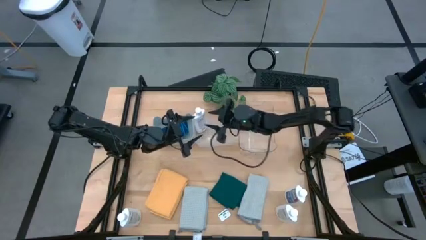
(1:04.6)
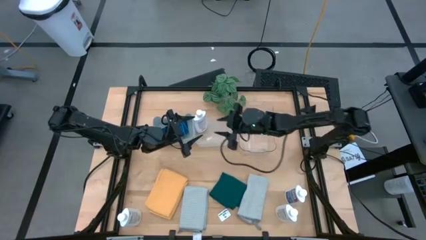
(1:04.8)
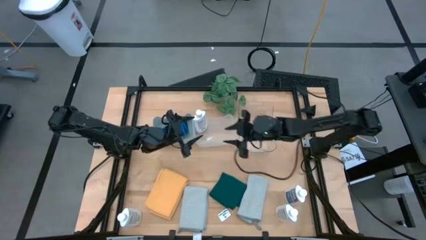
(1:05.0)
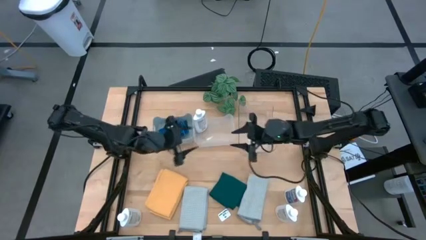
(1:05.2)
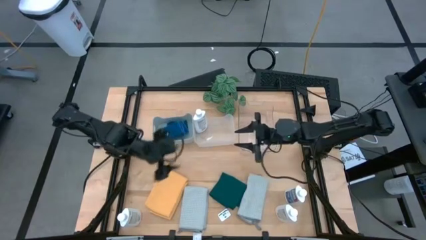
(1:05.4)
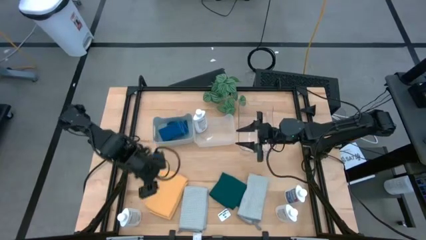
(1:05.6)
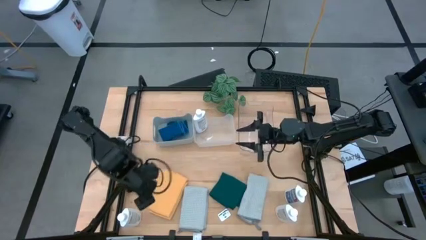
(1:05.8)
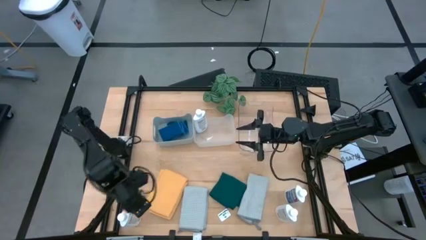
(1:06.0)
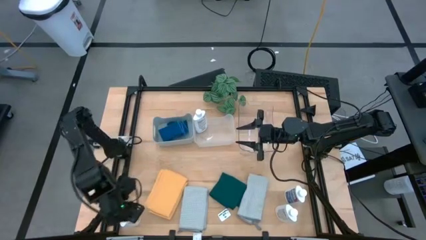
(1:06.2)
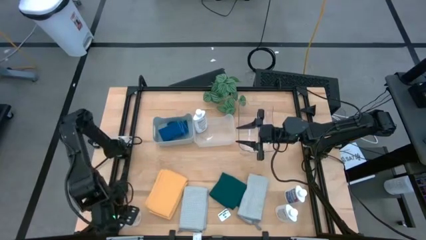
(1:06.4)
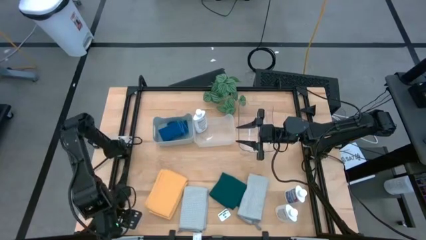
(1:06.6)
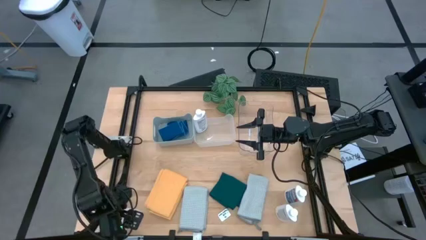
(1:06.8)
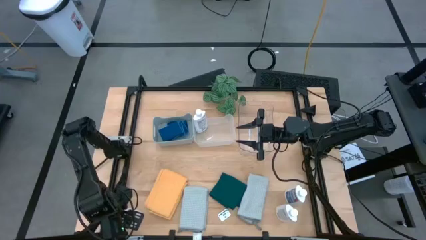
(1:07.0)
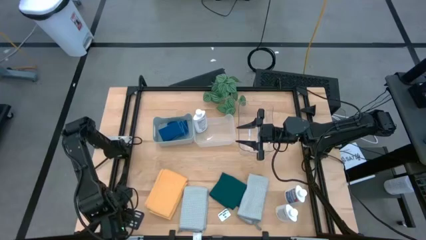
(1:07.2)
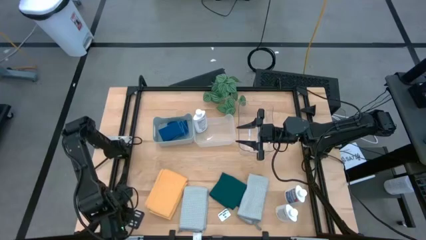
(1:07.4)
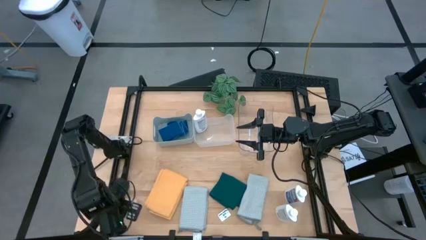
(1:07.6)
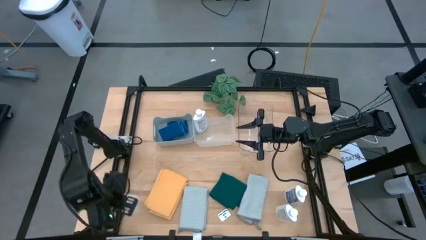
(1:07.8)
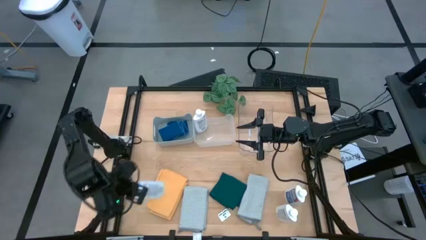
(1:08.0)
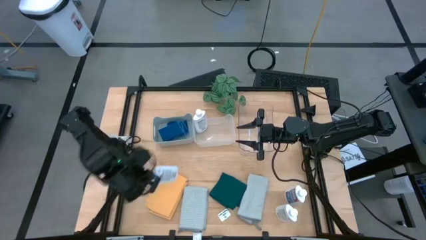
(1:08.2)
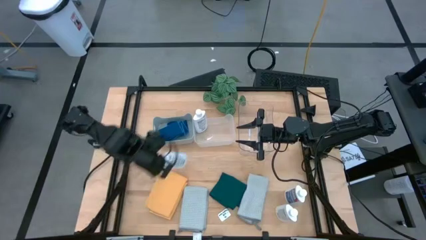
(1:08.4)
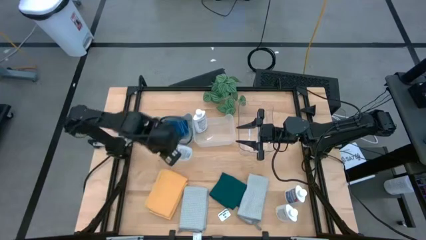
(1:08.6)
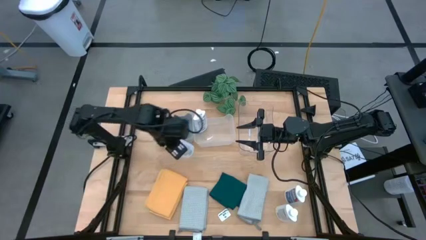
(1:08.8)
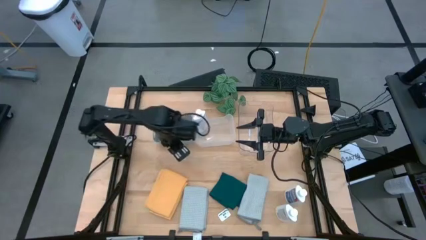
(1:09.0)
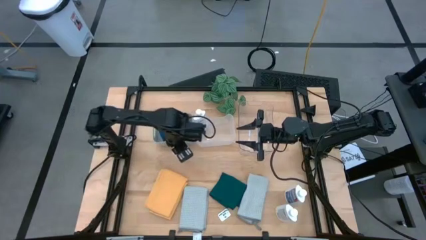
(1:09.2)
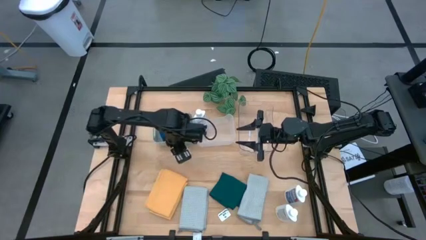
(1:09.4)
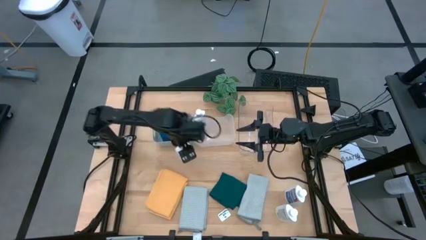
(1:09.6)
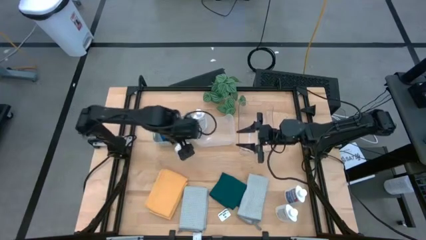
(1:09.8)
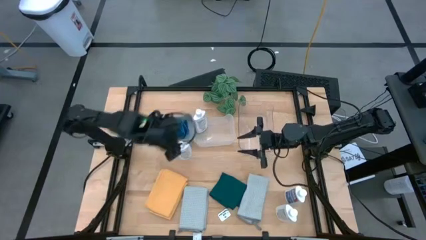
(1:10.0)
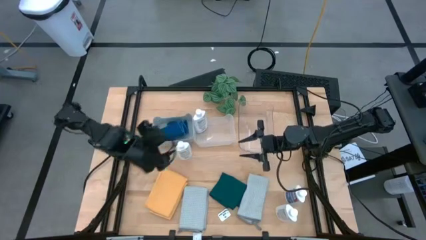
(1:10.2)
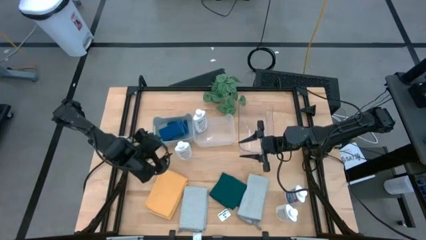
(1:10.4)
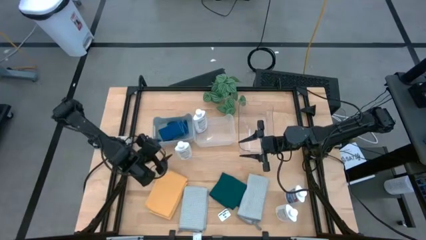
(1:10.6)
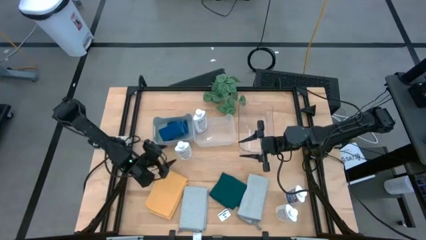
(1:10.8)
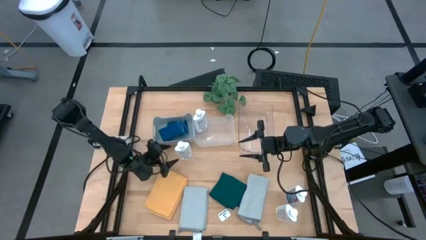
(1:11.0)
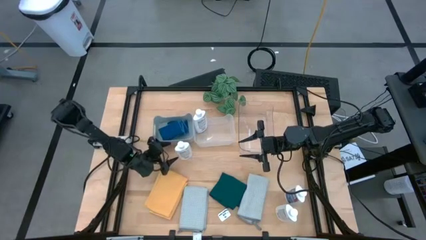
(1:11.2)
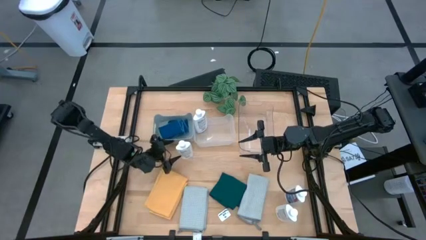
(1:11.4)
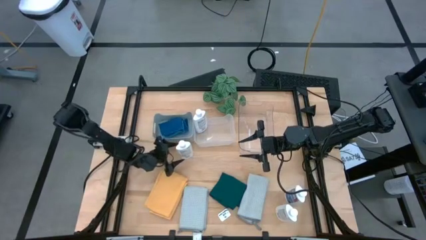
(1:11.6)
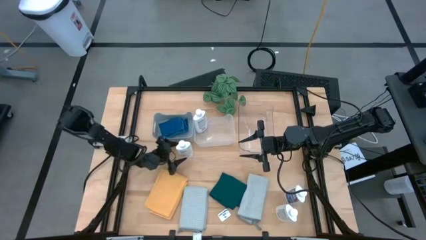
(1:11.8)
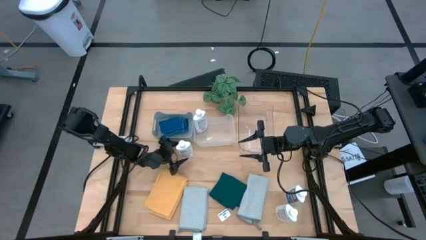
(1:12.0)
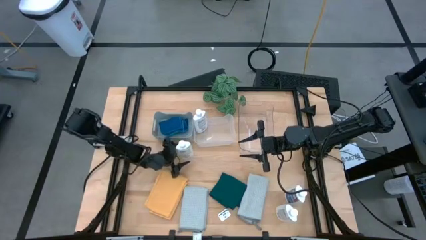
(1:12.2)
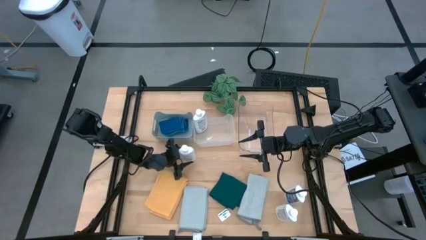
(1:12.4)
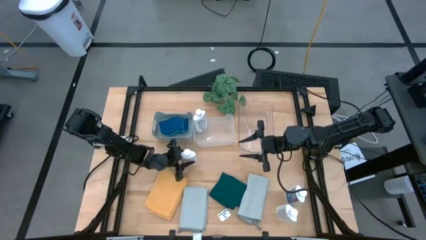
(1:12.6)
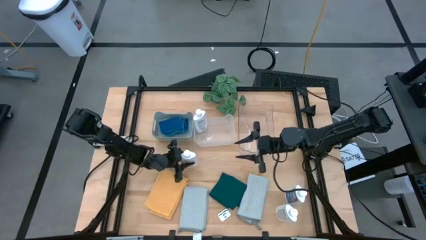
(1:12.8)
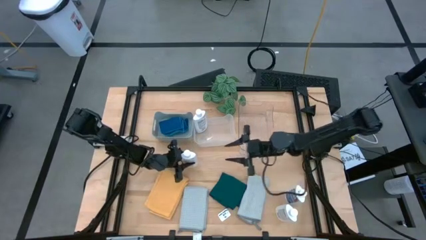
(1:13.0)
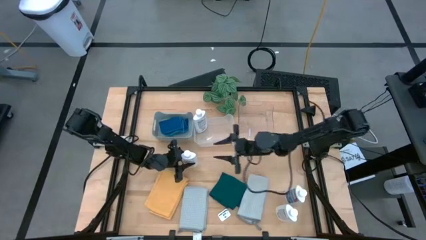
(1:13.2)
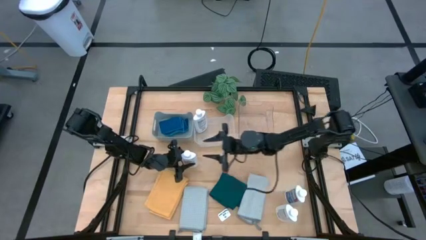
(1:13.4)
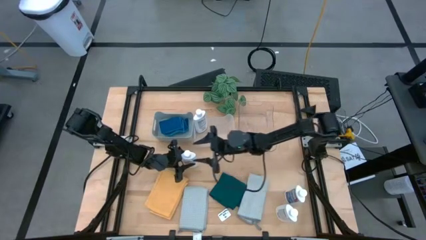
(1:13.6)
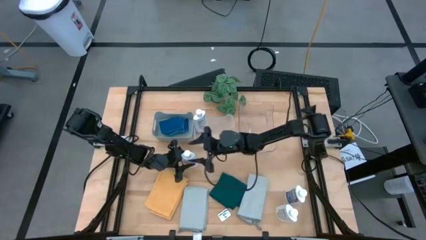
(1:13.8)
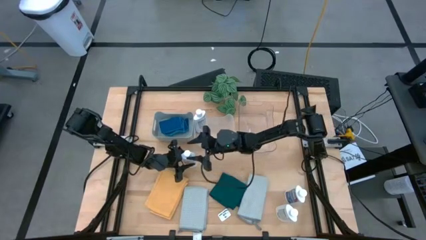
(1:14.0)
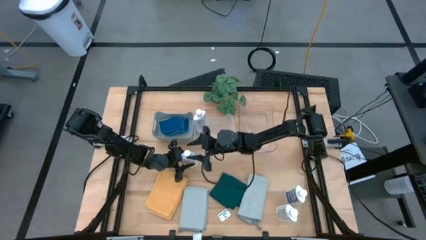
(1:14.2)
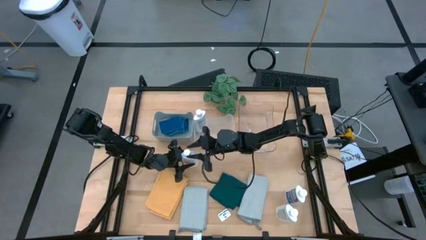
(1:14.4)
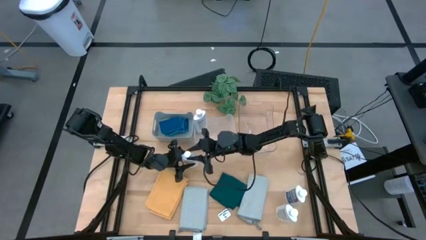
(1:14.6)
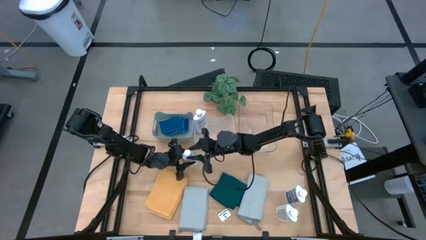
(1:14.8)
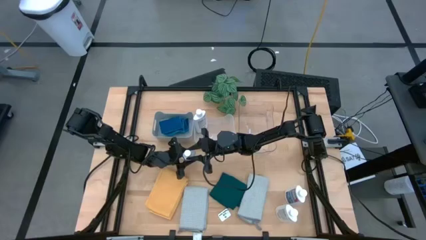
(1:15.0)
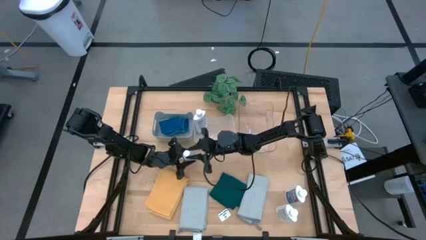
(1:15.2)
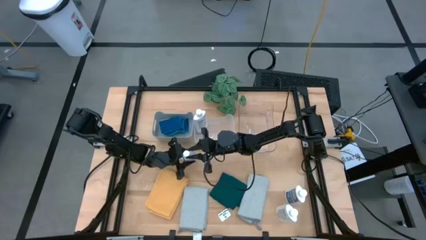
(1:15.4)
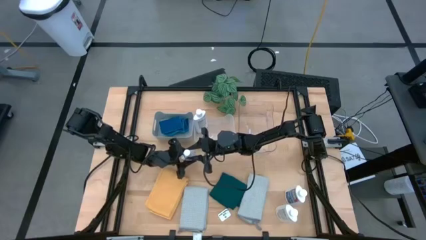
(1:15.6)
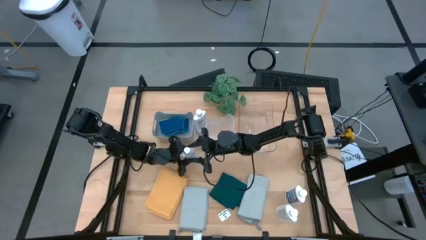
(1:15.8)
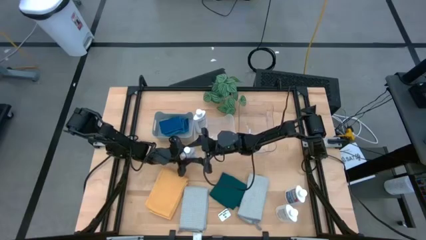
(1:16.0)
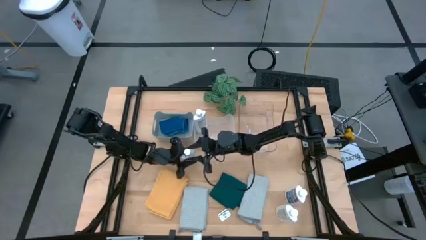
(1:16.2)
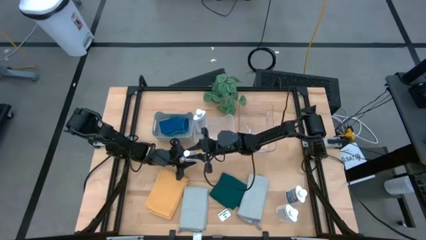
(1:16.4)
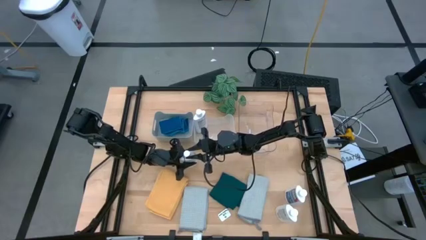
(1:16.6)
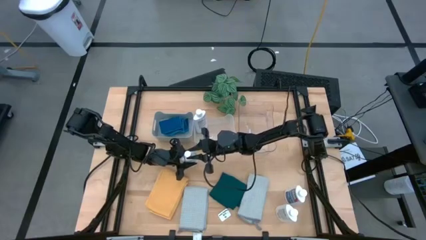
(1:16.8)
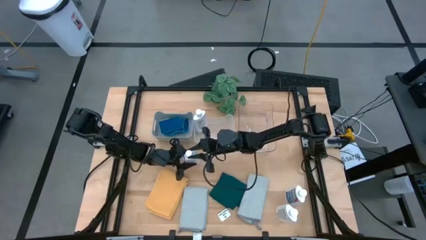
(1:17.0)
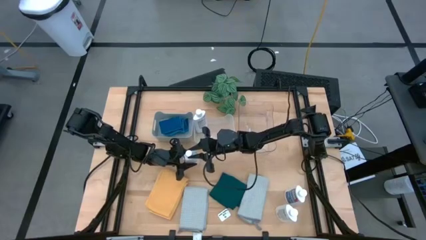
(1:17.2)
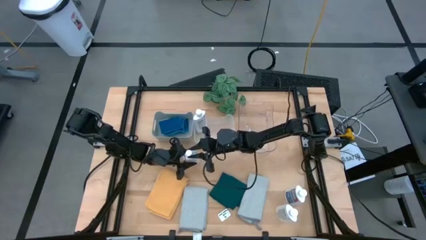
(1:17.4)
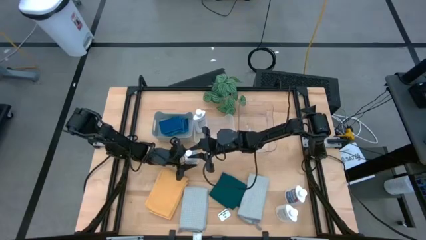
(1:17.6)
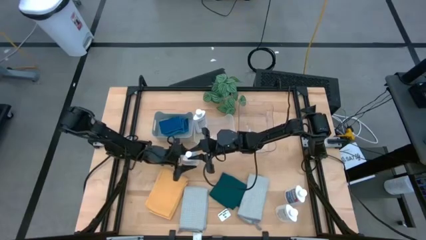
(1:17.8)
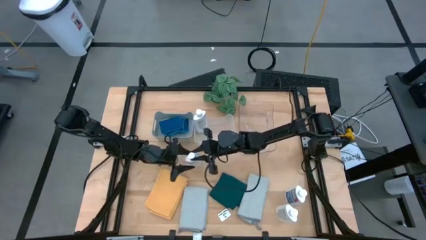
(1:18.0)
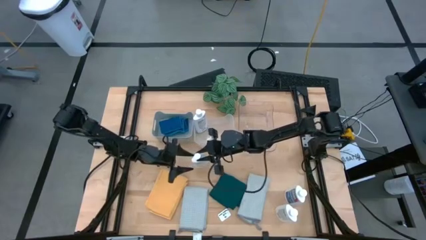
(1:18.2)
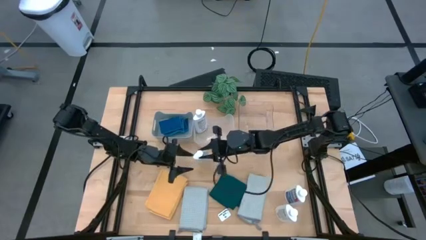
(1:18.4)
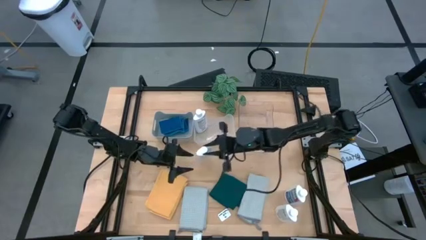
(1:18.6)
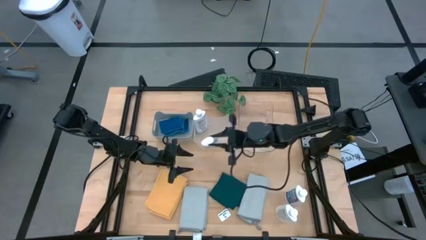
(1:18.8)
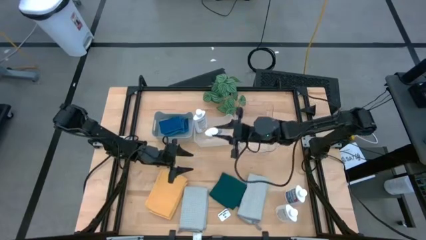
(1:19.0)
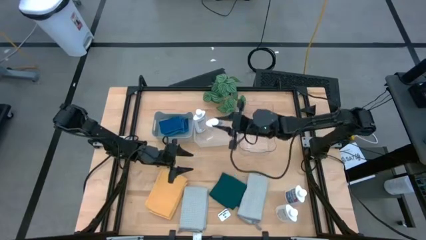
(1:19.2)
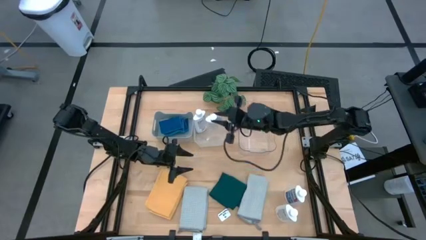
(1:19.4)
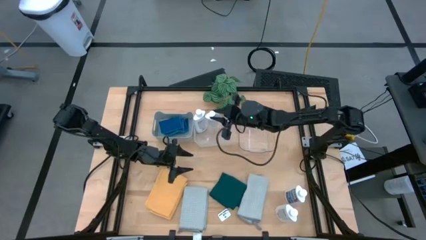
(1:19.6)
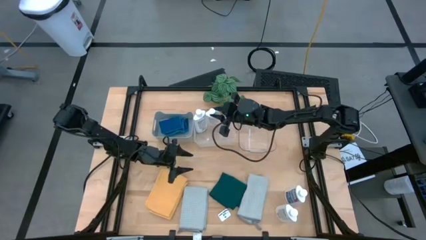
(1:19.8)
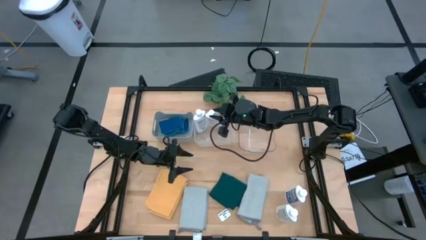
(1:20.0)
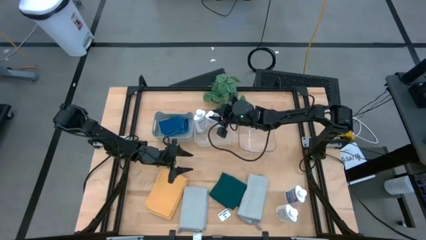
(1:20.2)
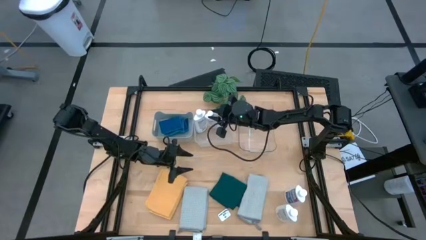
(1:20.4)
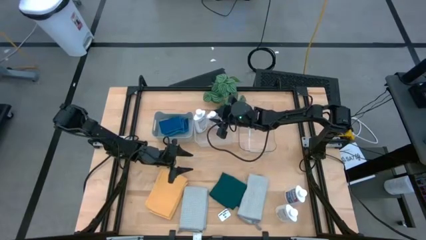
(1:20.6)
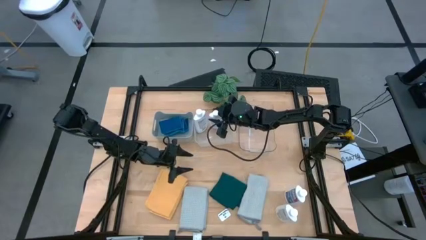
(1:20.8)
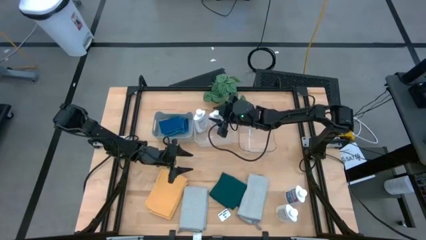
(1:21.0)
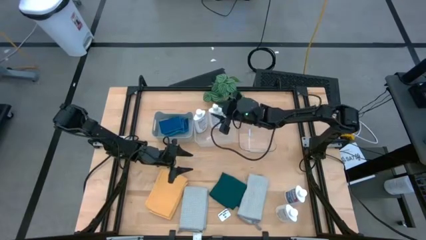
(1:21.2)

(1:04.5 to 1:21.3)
Task: Pick & Place Kitchen Items
Put the white plastic restorer bottle into the white bin
